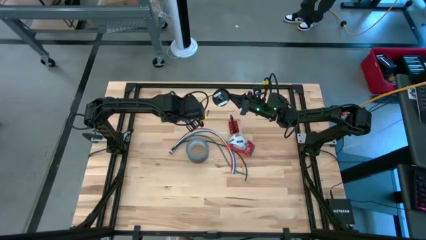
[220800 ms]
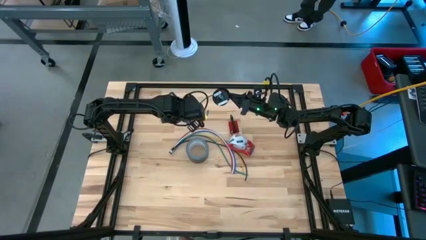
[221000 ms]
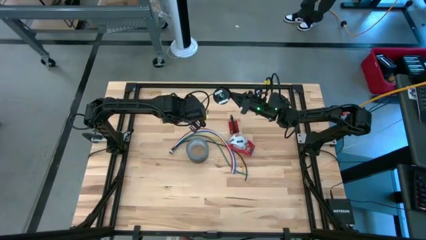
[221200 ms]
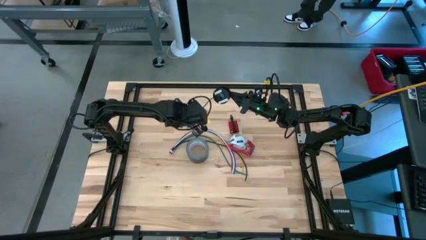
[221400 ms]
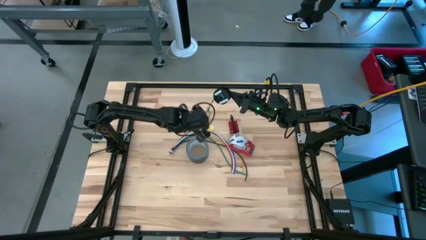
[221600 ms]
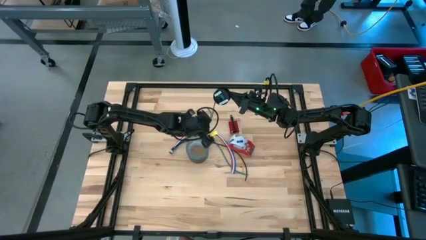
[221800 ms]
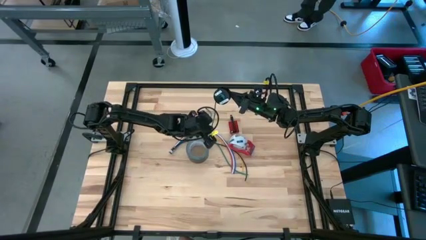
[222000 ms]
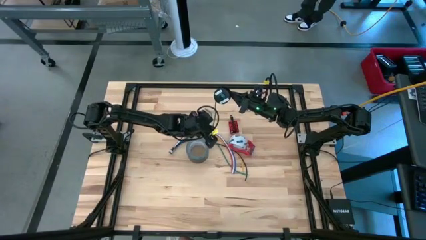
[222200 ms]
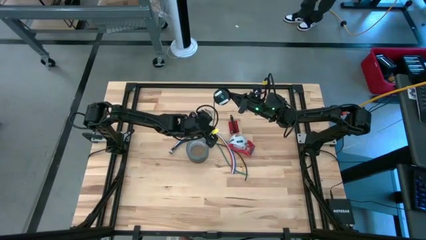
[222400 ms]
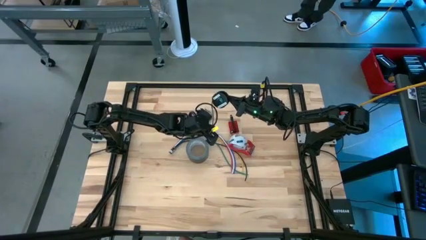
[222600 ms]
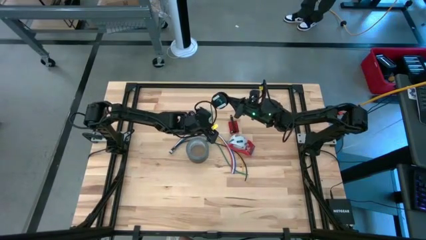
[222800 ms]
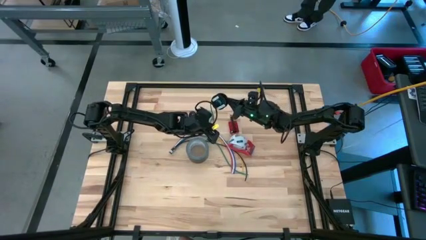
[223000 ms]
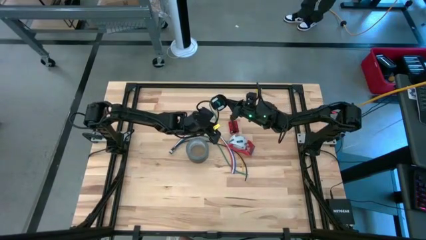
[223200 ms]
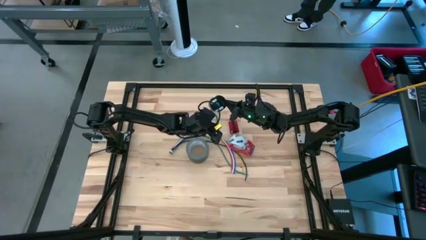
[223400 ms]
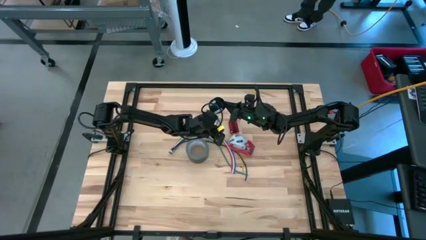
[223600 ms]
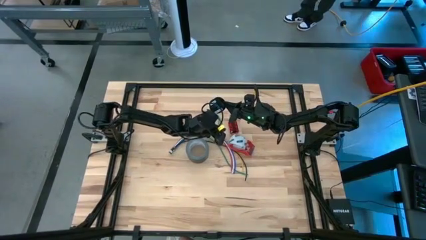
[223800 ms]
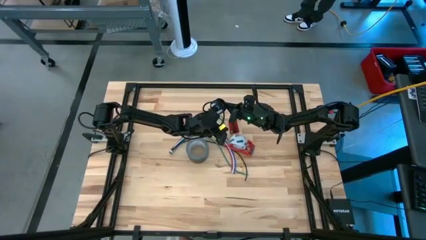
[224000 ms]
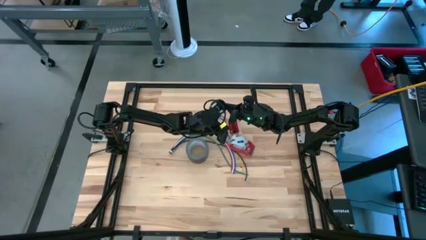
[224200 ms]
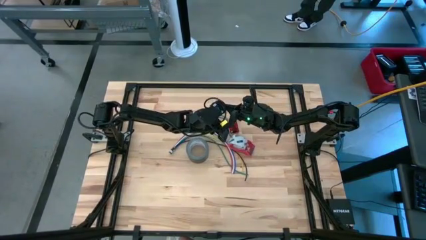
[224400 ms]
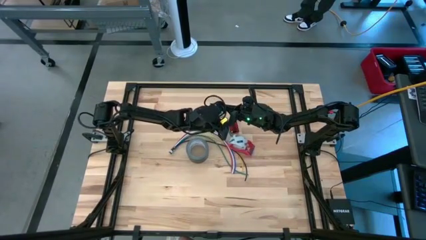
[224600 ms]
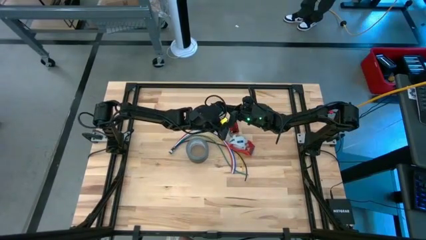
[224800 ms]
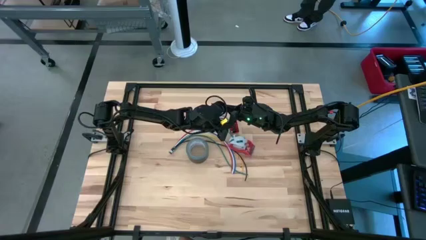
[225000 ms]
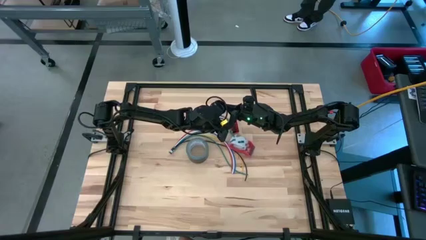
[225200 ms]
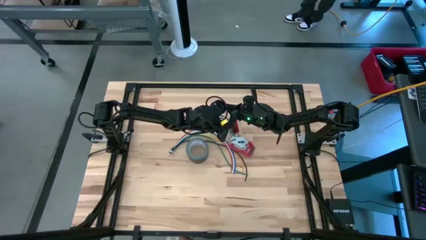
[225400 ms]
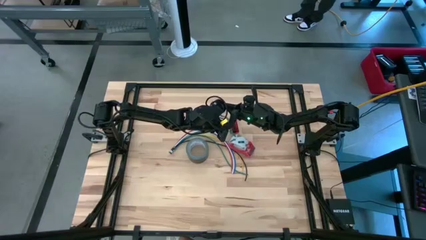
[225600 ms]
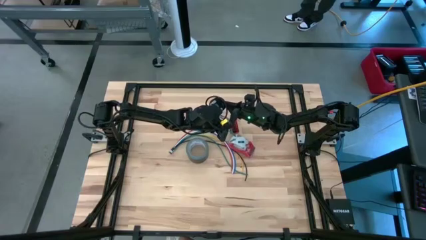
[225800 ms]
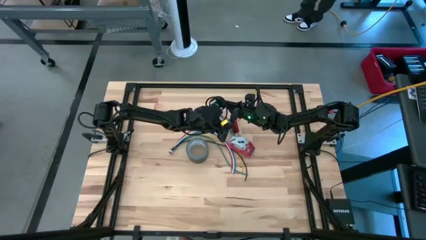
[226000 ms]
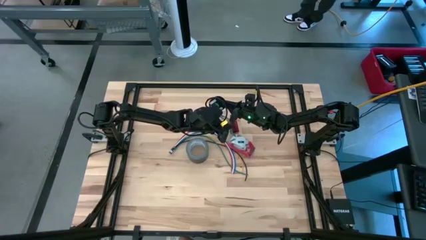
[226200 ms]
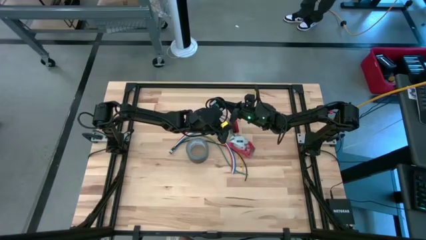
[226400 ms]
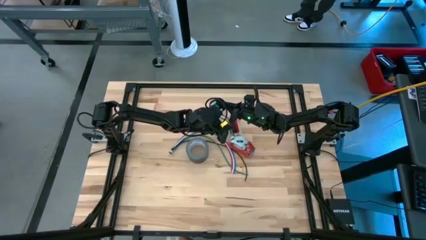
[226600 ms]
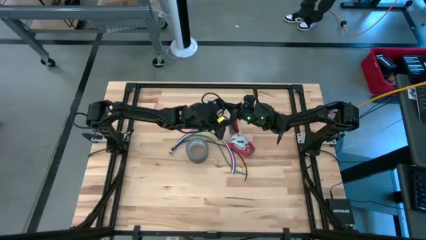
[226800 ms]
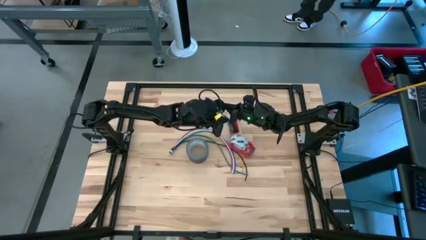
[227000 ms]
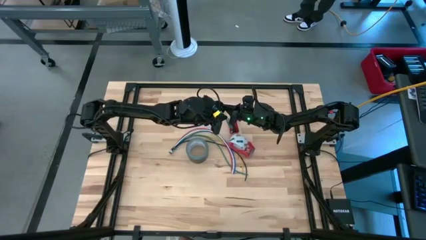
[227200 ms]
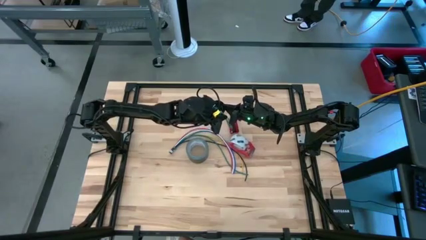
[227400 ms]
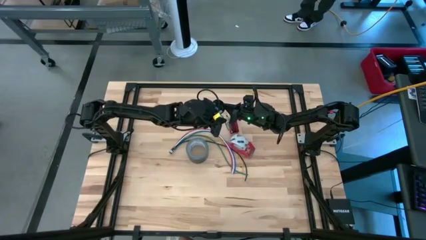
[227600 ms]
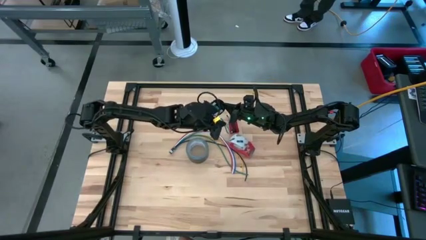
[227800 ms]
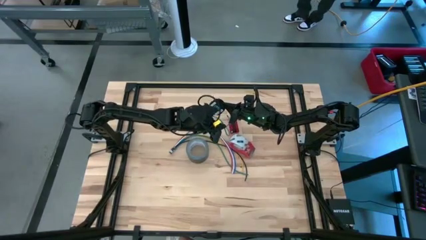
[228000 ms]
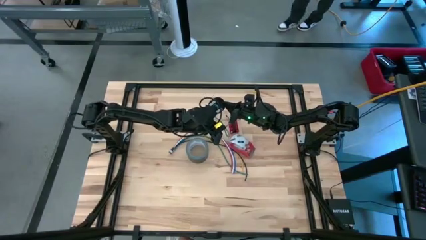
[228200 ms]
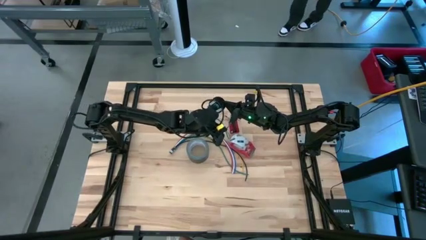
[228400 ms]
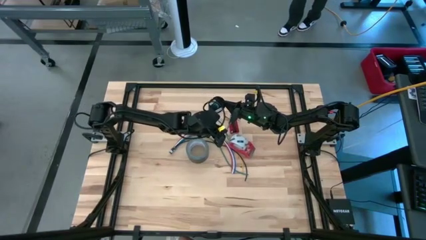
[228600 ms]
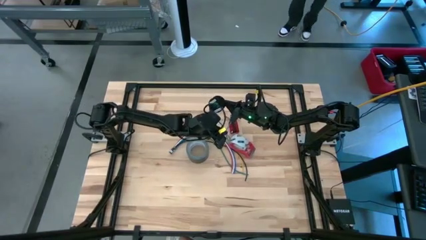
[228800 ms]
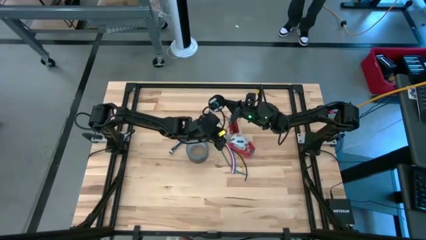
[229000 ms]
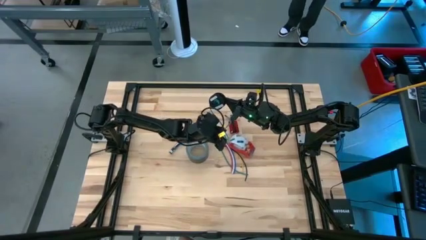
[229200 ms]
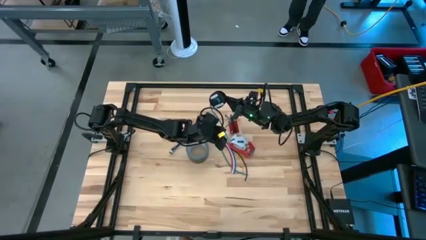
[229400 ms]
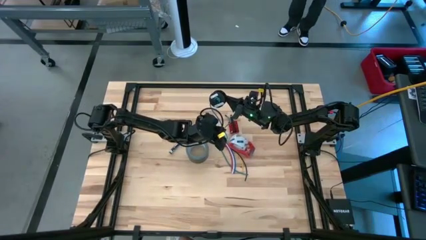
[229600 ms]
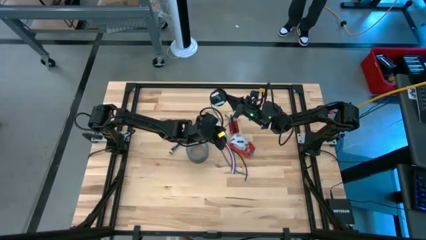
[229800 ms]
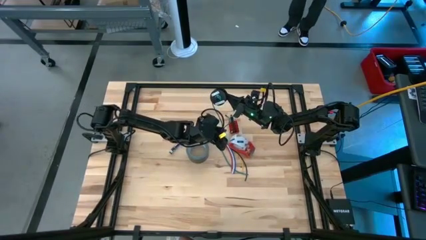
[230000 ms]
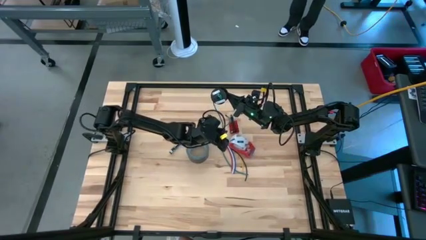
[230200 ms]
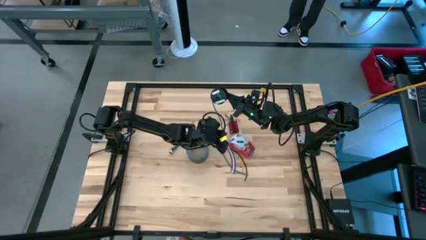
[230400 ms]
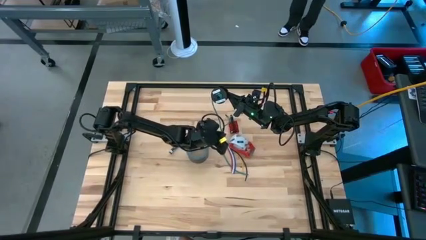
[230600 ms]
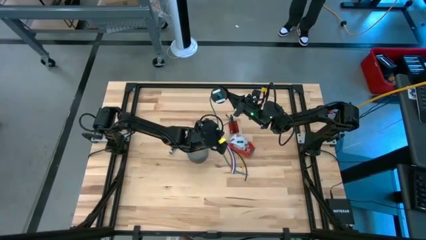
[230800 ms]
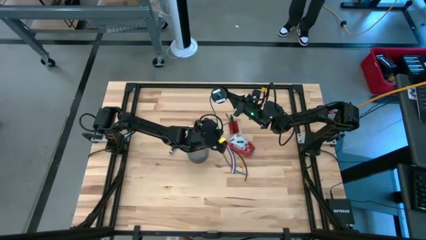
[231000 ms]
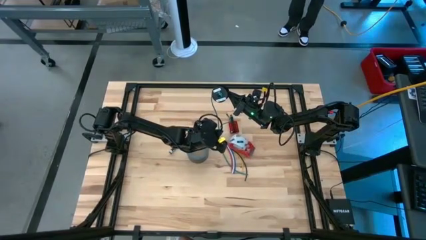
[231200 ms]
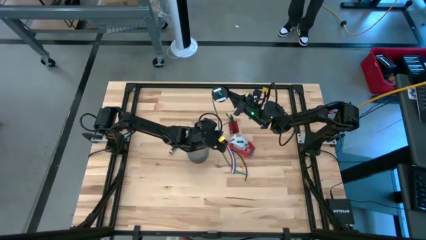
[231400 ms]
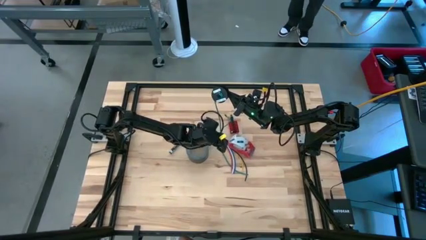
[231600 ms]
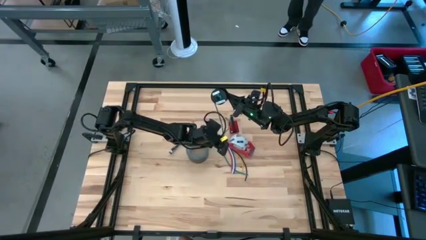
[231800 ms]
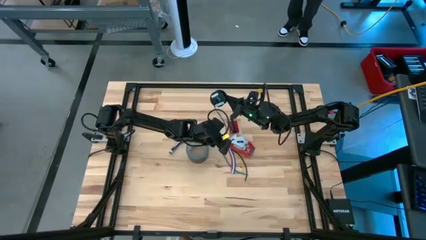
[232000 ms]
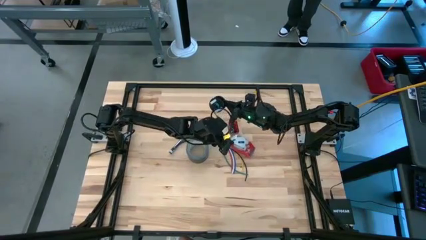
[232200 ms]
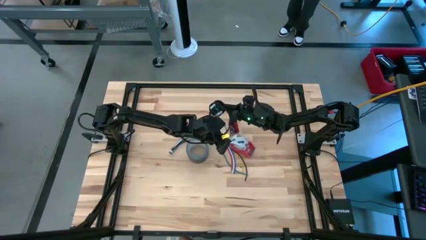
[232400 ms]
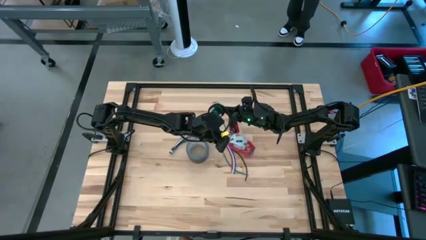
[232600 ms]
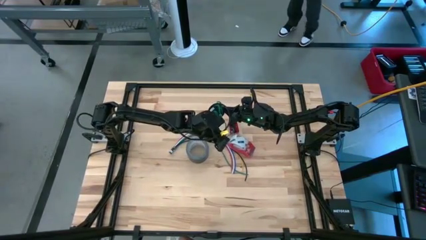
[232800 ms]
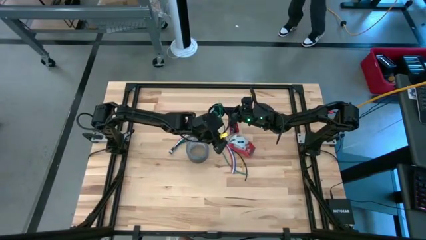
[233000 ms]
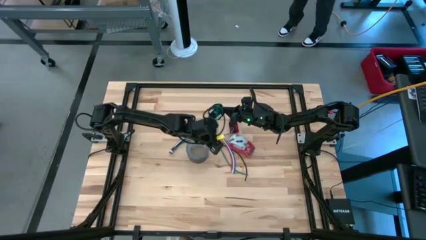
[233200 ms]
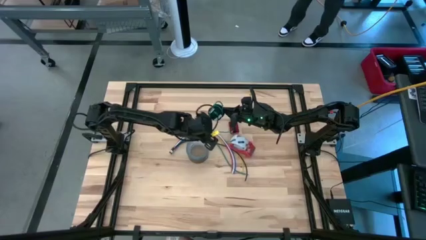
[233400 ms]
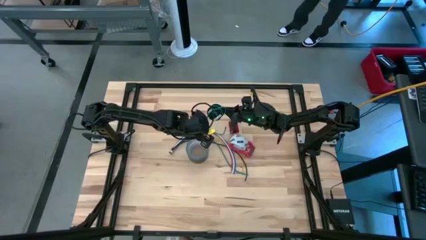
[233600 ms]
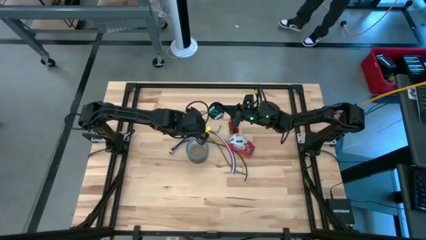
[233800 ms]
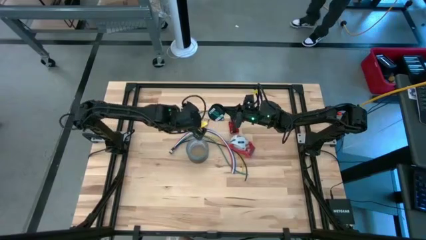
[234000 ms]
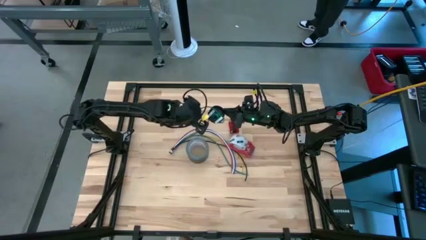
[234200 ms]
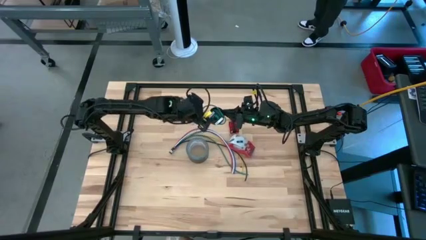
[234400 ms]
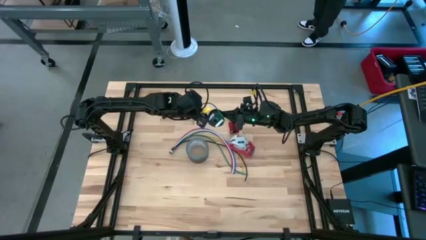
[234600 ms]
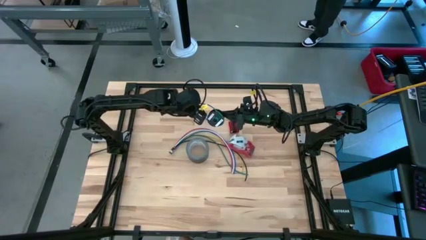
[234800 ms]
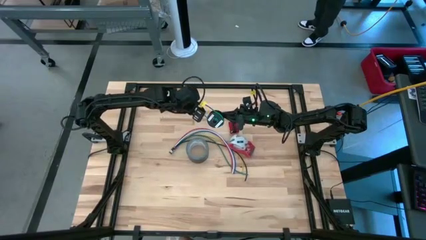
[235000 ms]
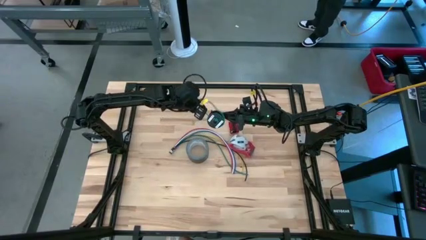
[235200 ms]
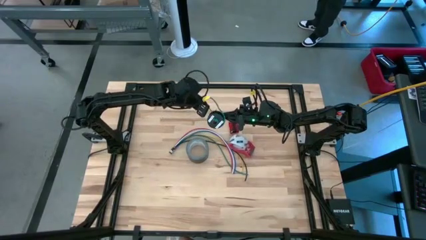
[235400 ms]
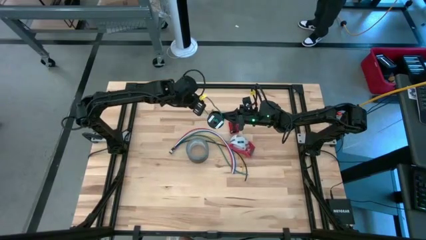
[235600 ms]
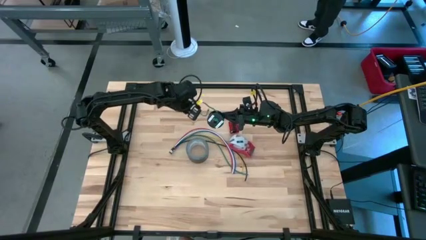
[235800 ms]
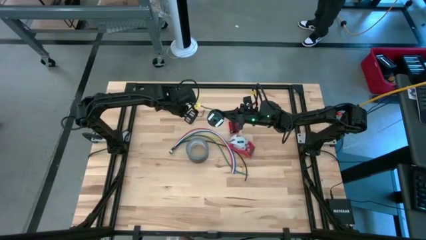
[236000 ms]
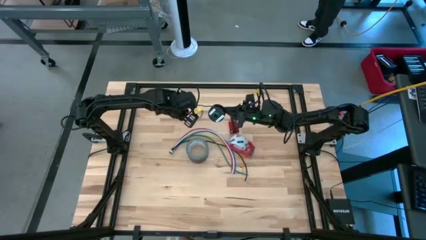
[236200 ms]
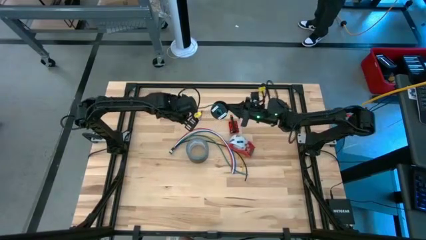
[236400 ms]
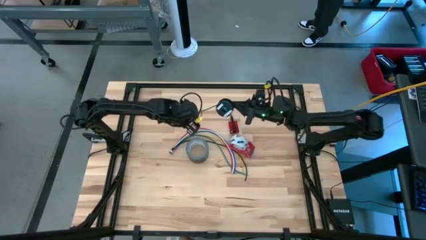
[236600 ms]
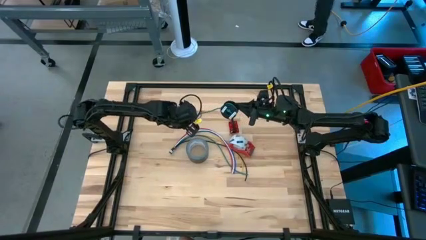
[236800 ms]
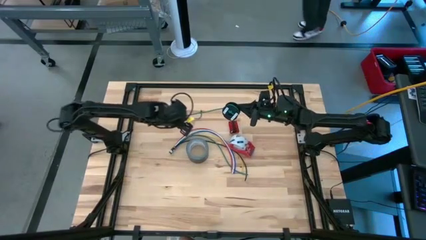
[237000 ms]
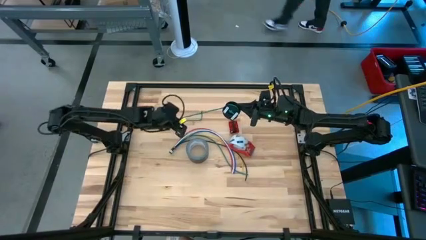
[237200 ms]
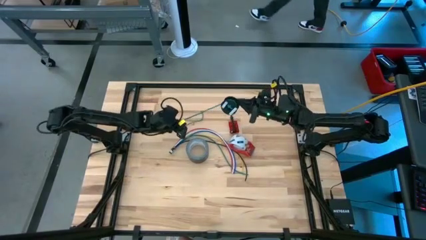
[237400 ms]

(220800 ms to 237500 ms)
Task: Coil cords
Coil the green wire onto the black spool
